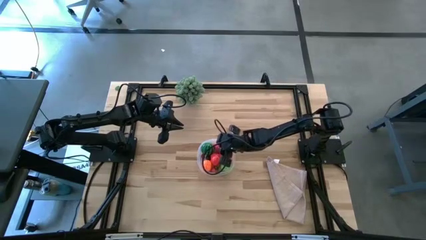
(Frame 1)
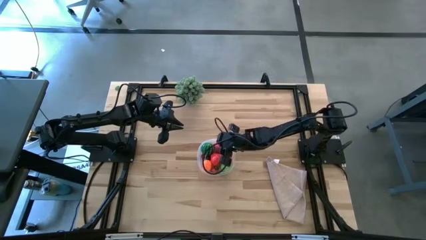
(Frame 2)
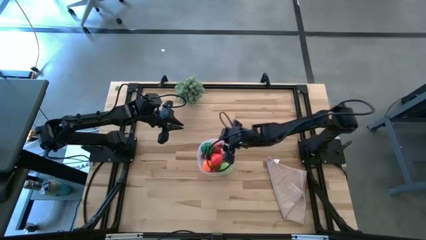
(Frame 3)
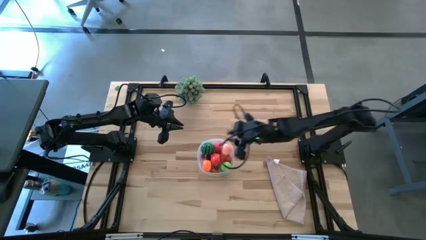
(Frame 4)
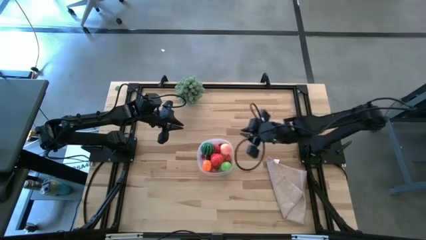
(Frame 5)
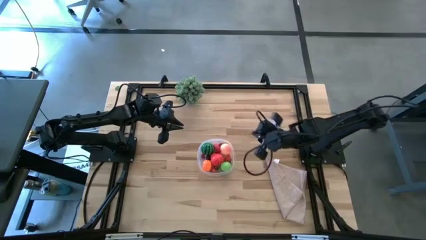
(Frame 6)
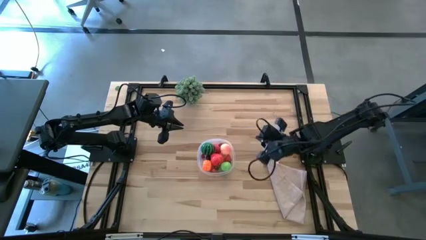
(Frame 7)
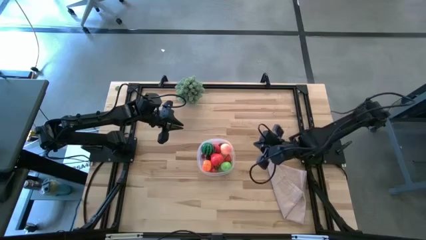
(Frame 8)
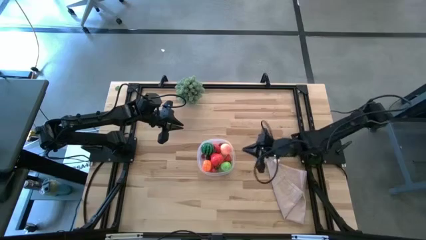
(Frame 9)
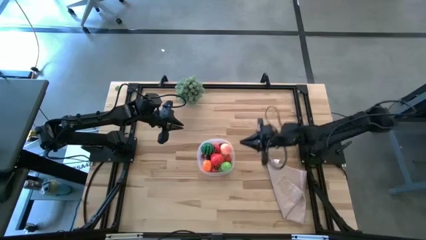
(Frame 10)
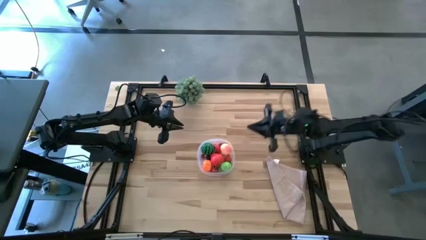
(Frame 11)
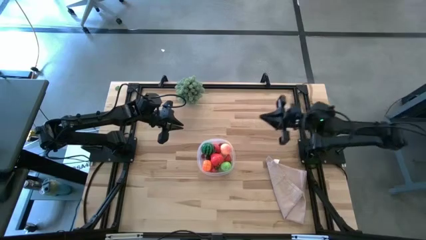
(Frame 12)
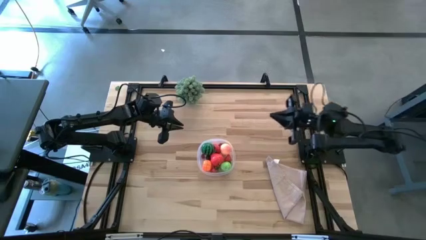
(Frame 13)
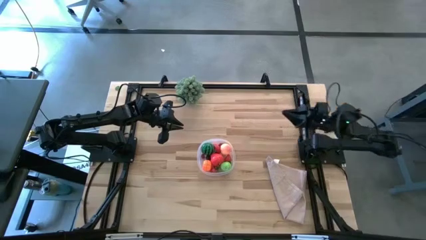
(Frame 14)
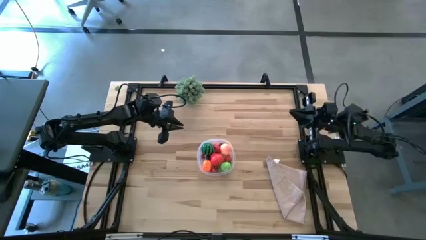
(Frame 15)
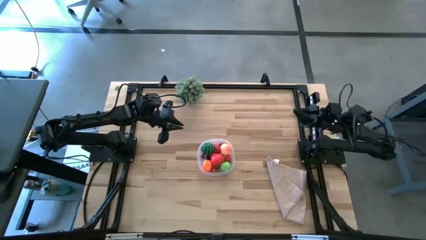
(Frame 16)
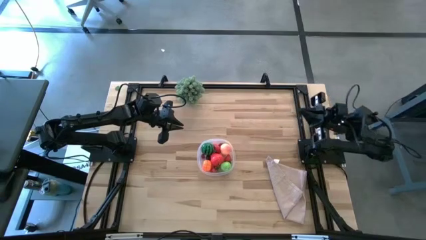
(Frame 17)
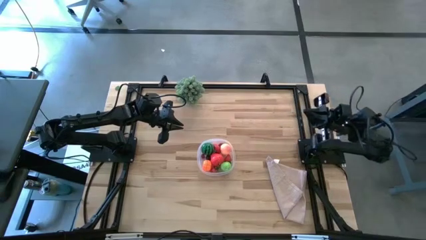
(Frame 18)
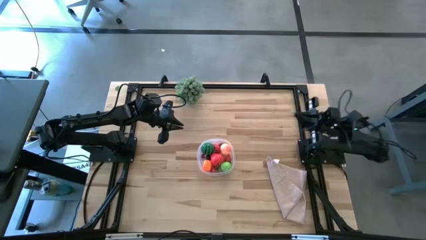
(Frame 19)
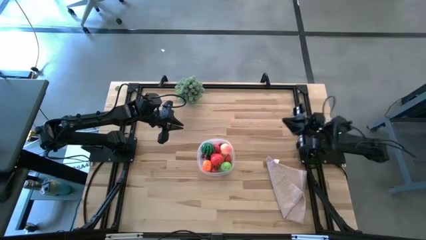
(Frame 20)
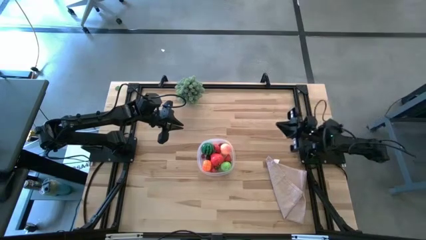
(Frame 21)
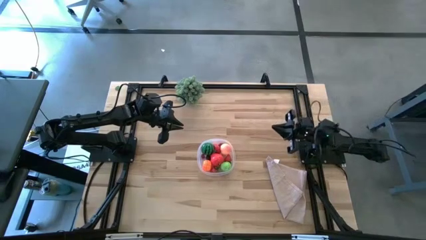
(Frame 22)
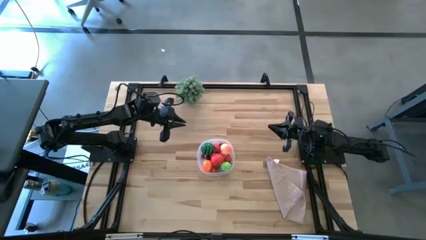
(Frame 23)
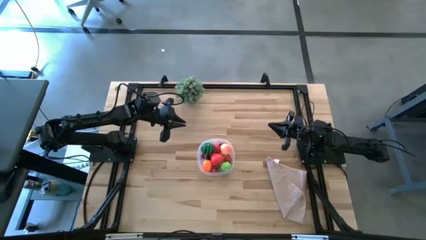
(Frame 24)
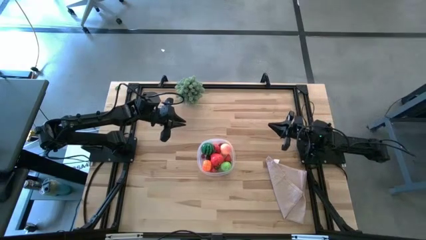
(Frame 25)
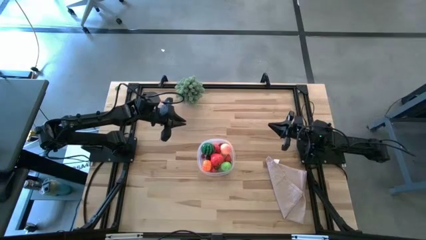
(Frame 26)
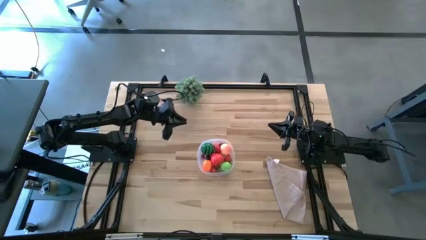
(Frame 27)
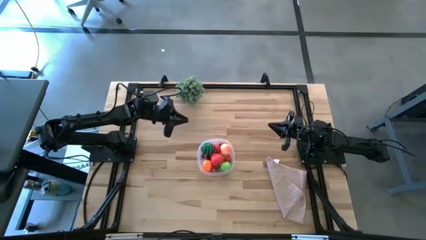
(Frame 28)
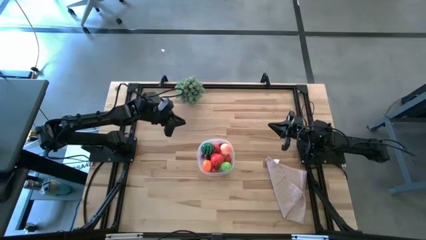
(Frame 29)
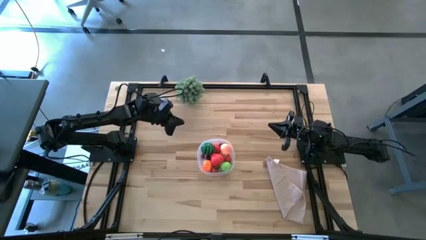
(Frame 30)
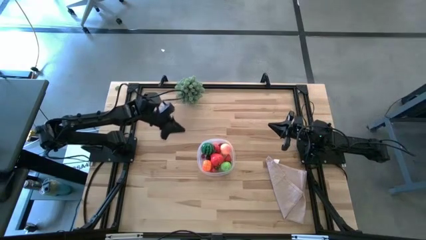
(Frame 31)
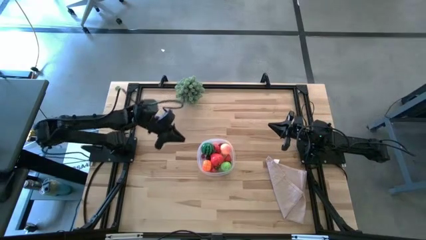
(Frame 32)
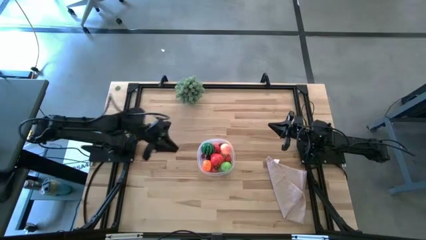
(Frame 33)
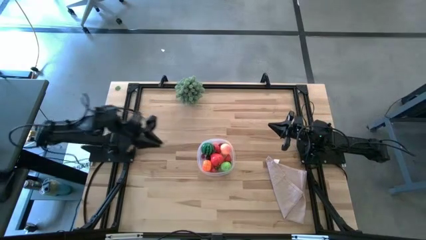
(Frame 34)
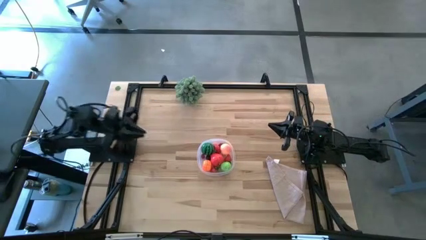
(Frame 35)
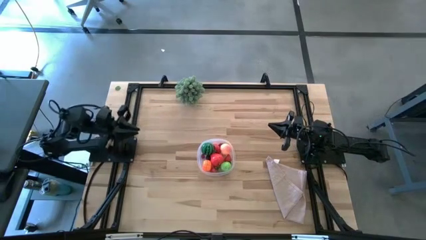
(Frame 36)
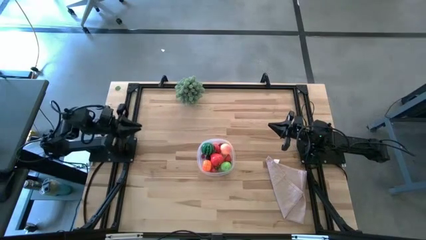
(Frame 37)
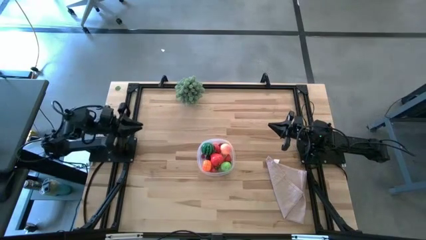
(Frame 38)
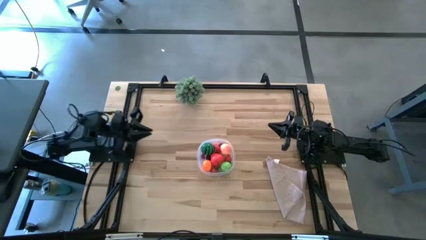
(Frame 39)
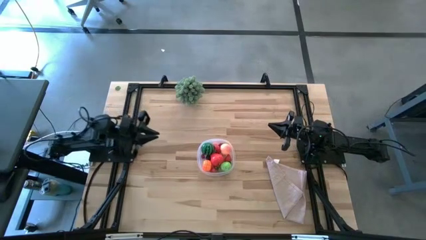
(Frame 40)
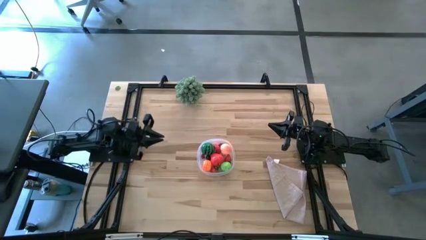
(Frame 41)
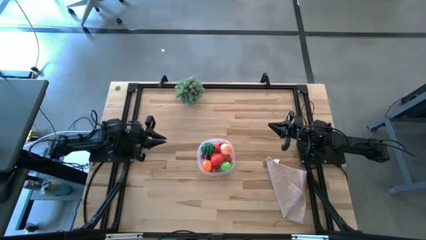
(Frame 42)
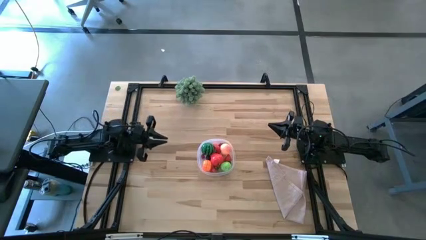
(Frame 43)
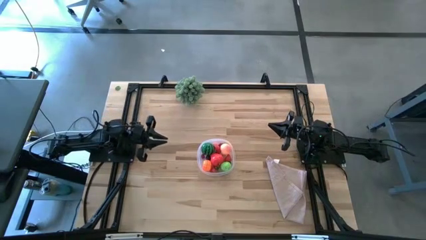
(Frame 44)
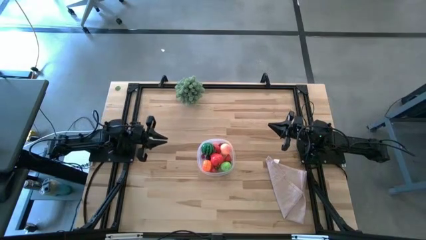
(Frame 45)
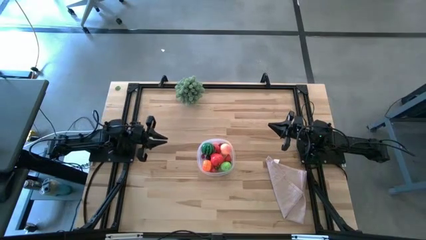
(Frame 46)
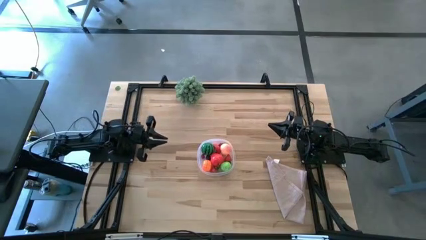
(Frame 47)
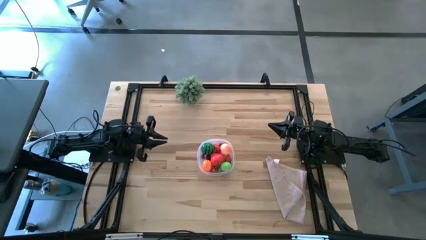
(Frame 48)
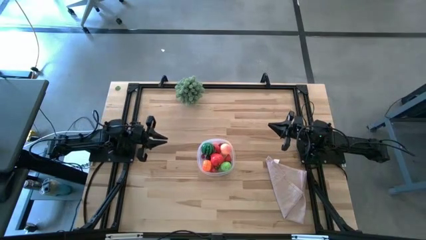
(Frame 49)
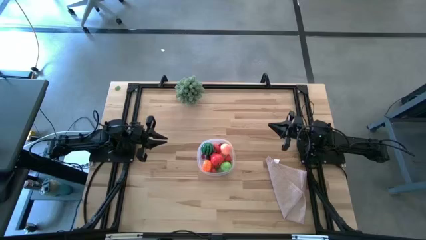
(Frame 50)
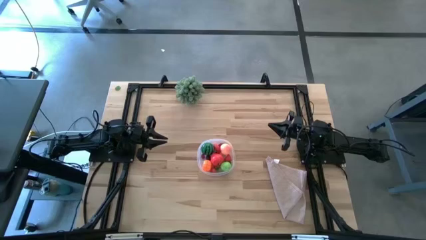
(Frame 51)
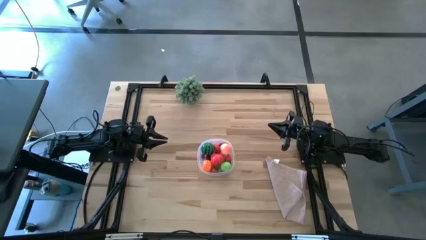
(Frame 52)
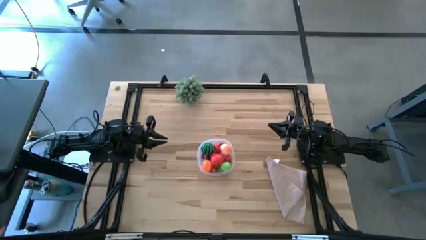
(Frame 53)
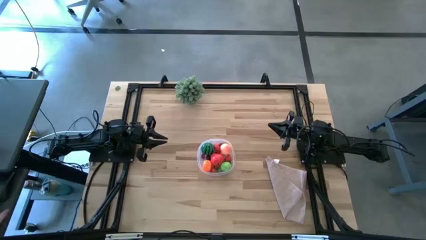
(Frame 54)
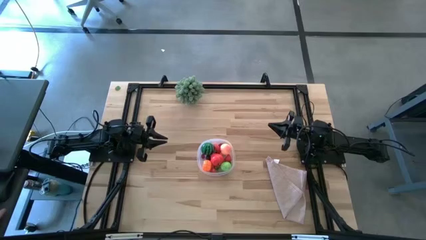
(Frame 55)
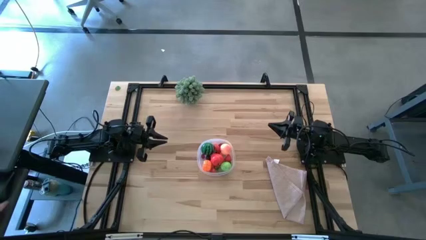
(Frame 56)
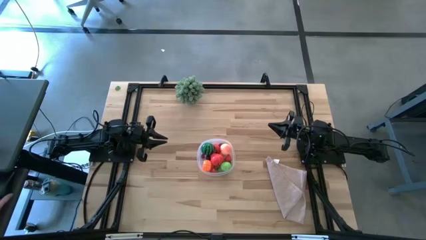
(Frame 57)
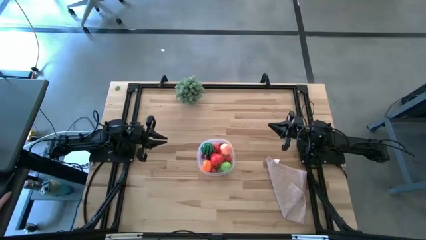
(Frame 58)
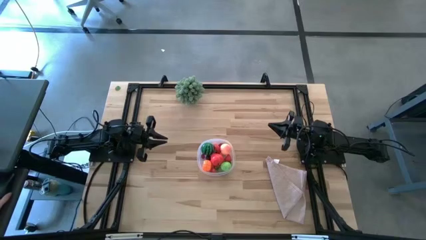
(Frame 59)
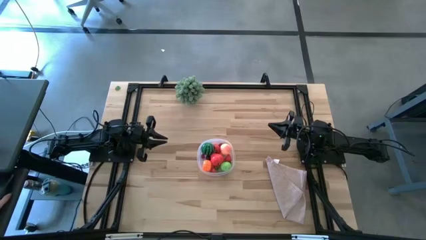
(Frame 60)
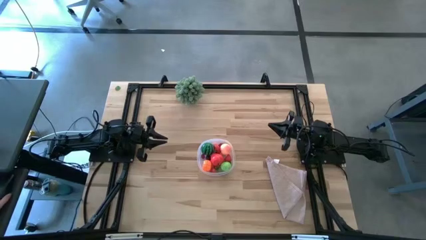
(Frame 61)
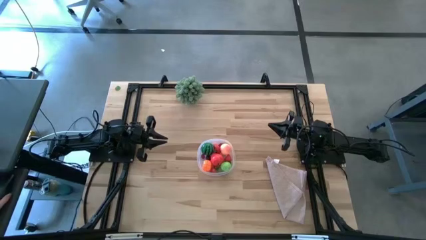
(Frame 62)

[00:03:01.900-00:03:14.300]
Task: Pick and placing Produce into tupperware
Return to Home Position

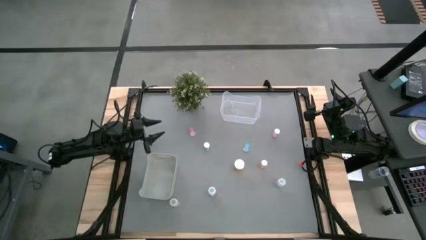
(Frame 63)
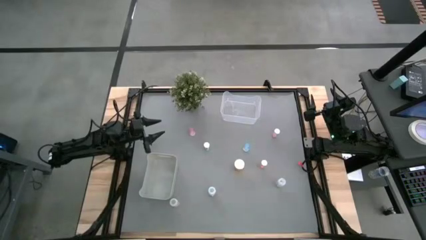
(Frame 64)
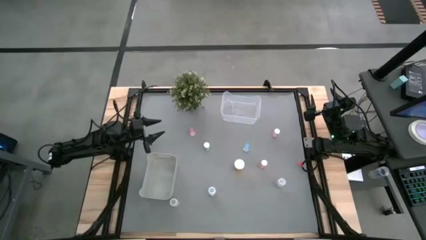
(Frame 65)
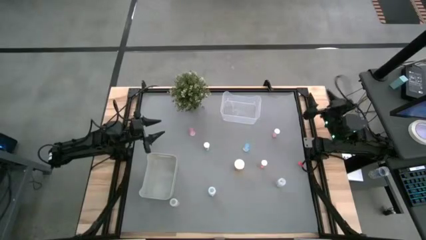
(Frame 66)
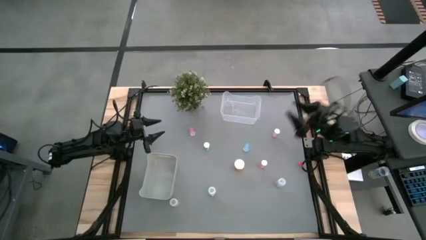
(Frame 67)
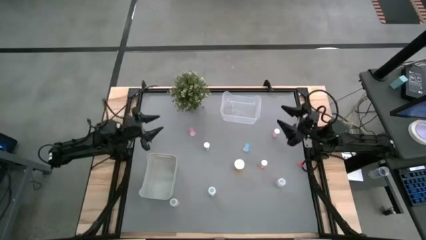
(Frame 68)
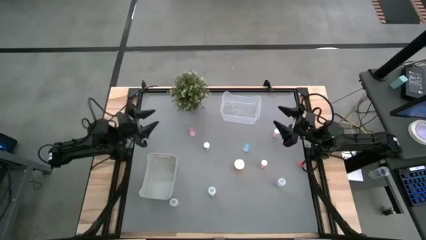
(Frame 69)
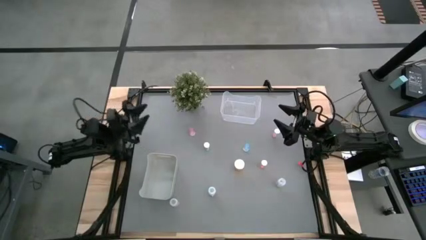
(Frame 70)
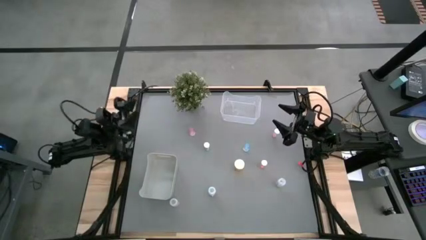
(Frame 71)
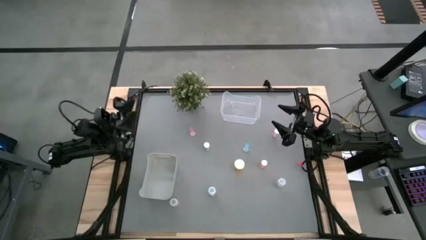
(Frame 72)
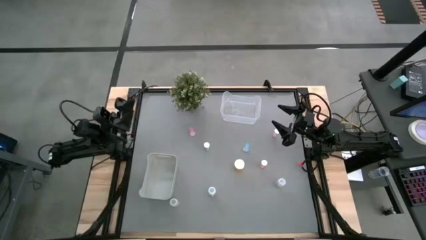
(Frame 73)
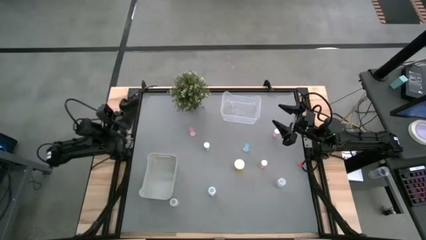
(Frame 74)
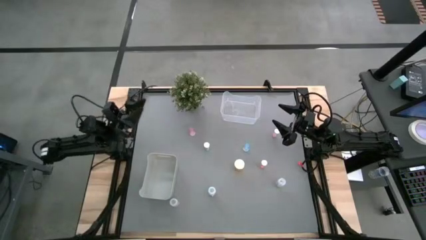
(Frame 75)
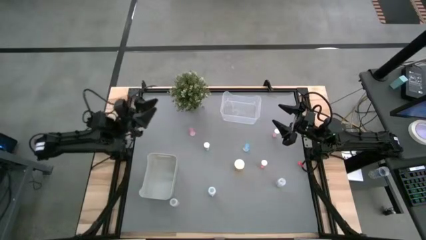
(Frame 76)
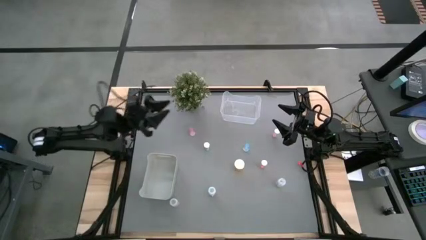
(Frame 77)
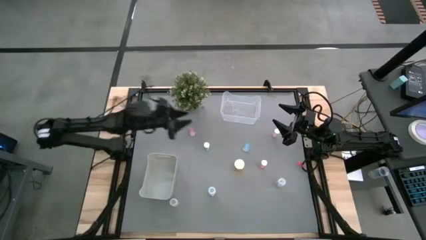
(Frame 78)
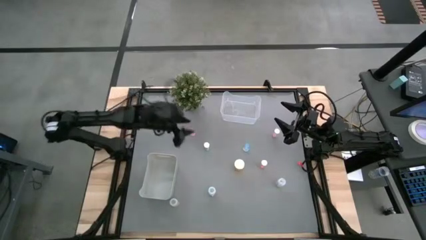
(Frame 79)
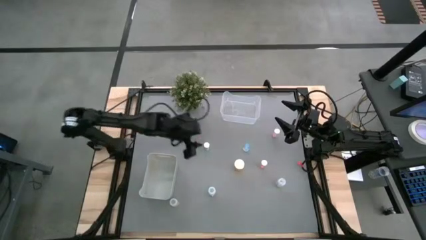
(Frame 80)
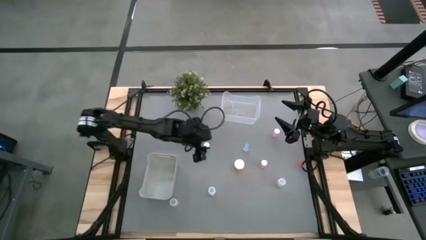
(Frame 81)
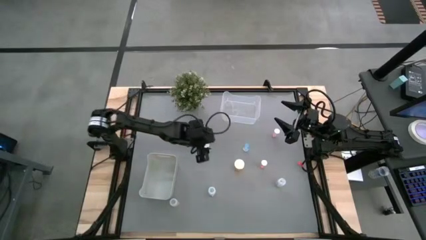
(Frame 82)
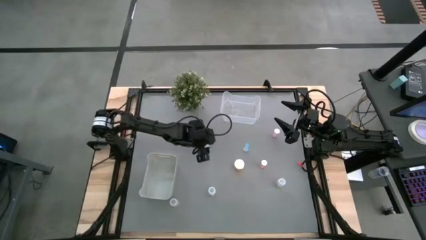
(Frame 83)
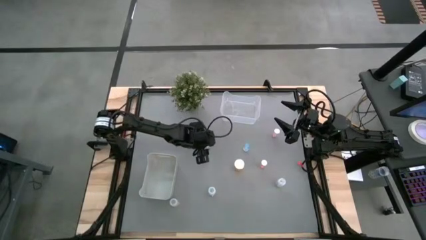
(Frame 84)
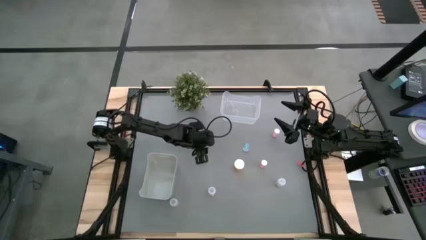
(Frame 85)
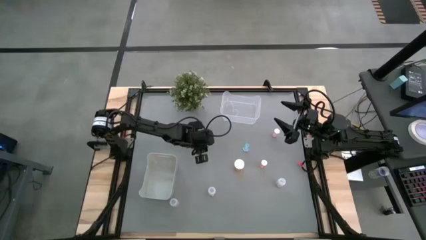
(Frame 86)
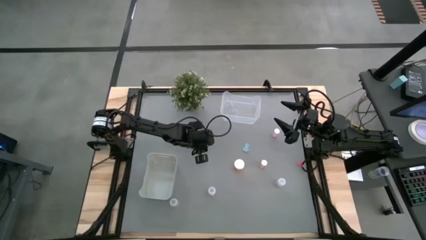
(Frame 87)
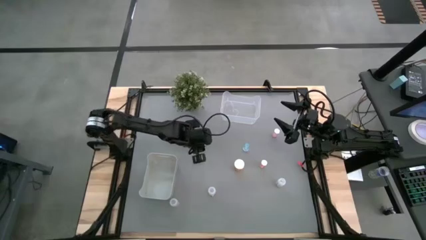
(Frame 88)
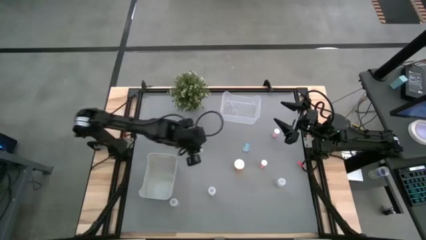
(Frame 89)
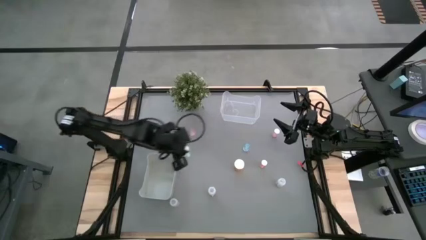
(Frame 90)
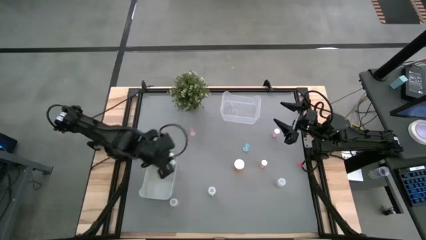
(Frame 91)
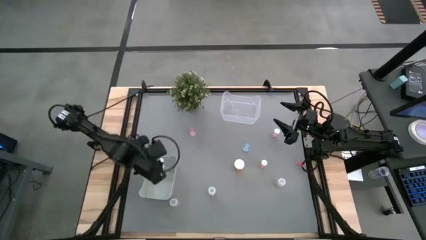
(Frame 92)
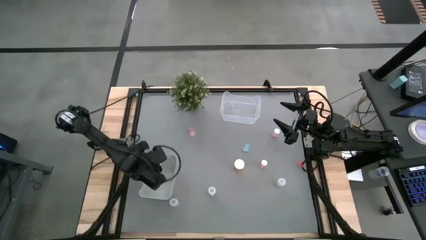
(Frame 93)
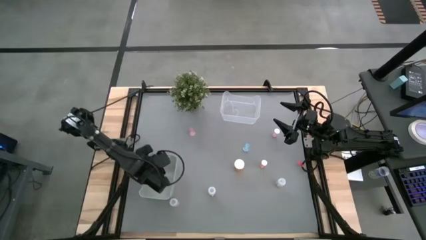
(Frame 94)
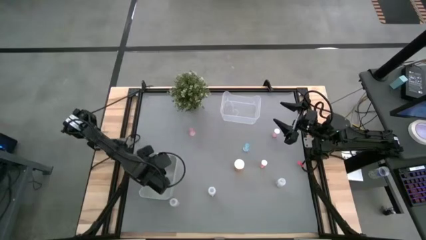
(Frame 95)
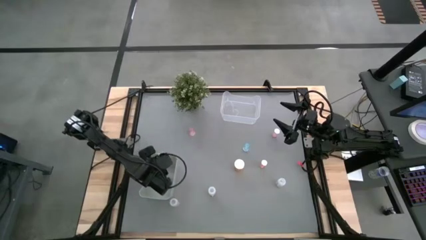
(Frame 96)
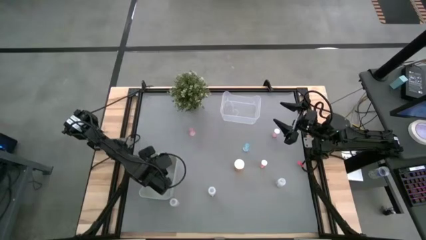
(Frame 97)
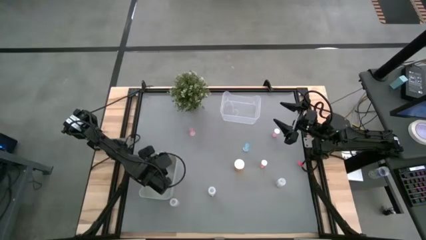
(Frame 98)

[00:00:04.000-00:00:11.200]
Task: Pick and place medicine bottles into bin by pill shape (circle, oval)
Put the green tablet bottle into the gray bin
